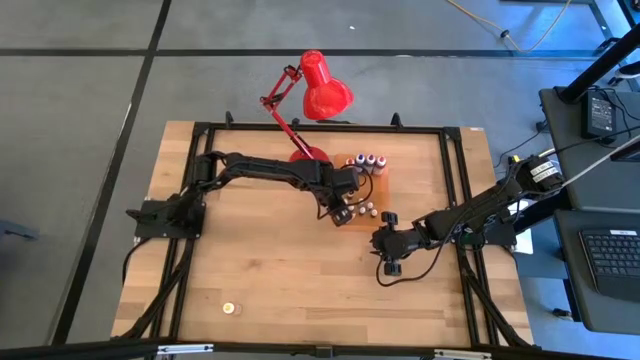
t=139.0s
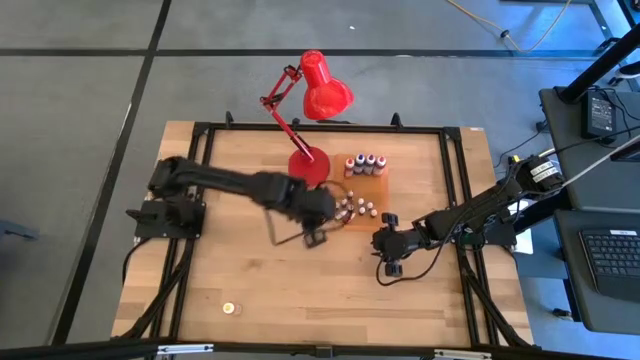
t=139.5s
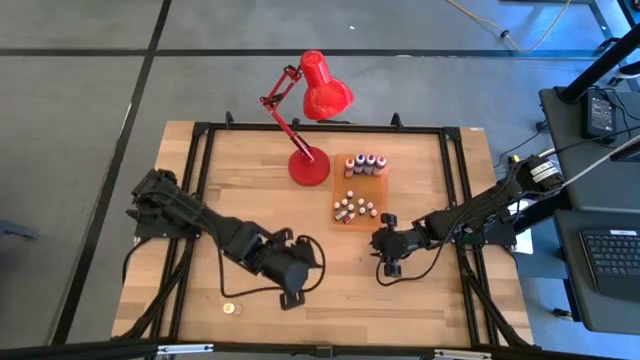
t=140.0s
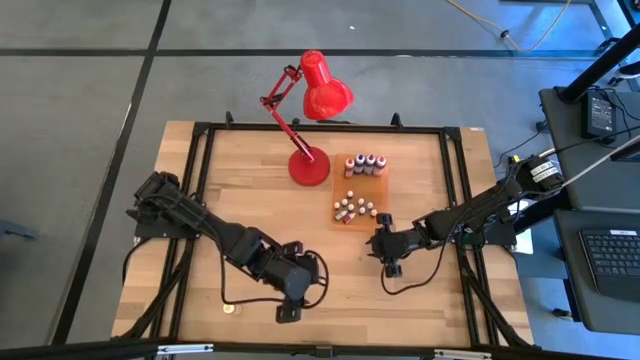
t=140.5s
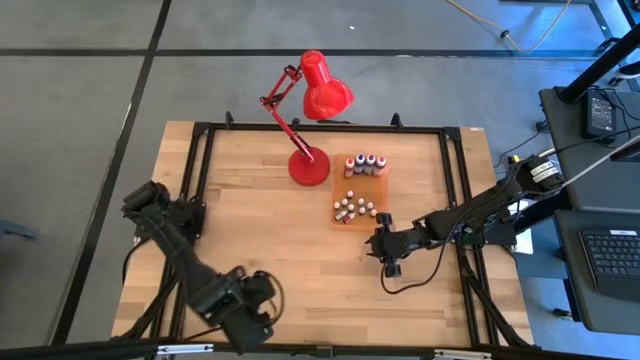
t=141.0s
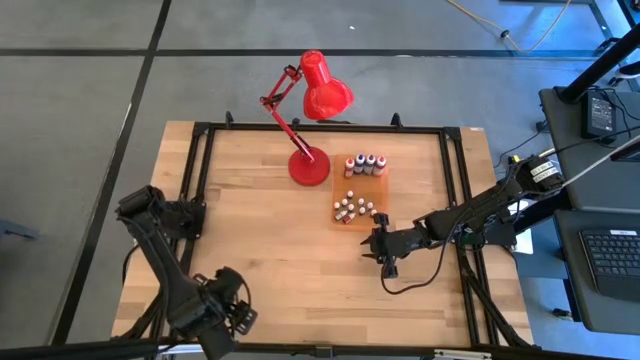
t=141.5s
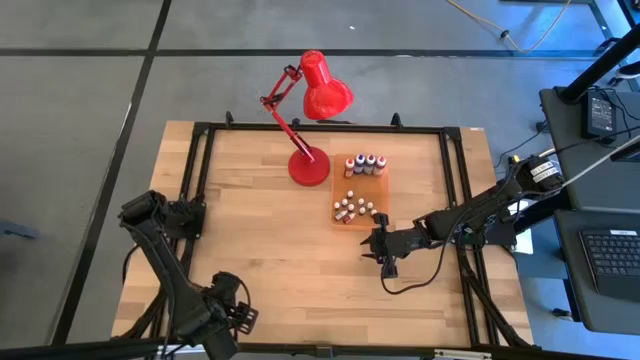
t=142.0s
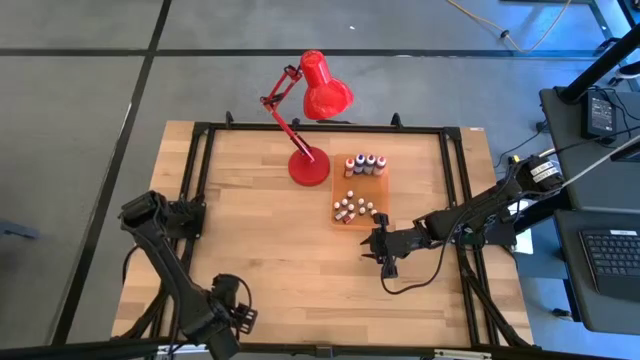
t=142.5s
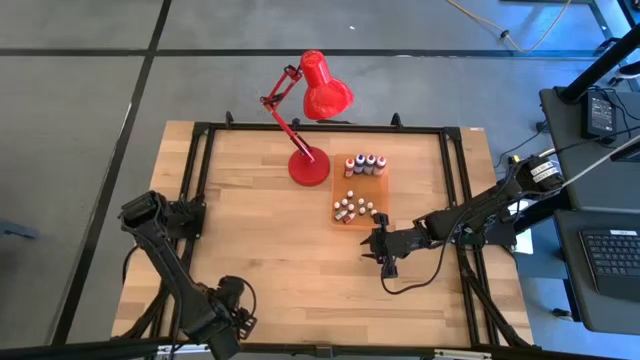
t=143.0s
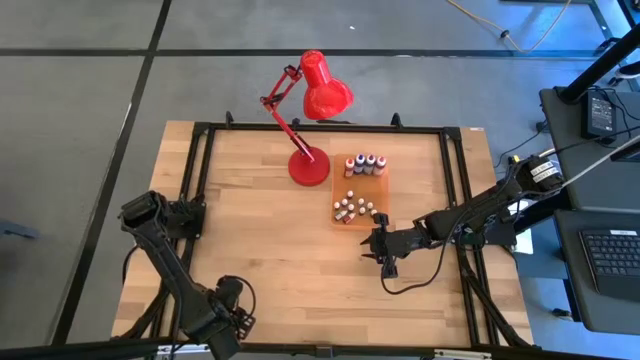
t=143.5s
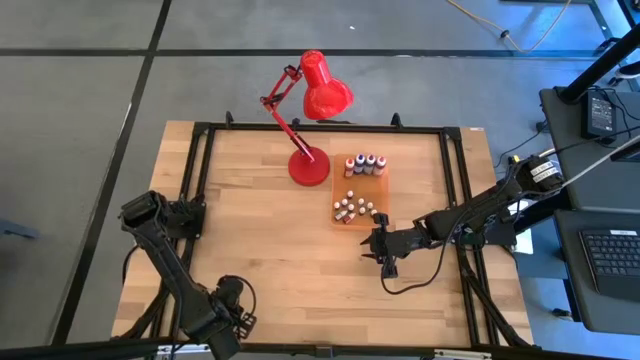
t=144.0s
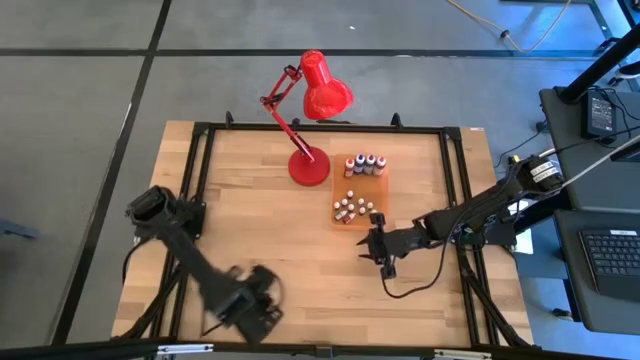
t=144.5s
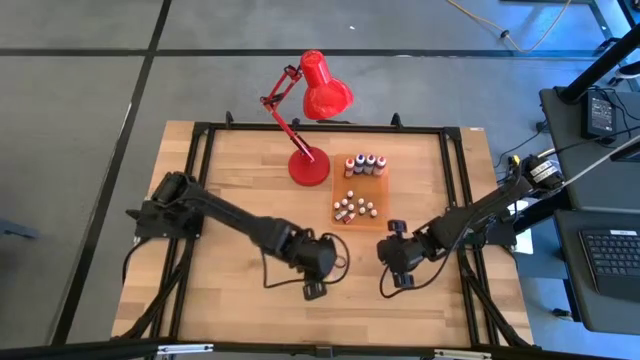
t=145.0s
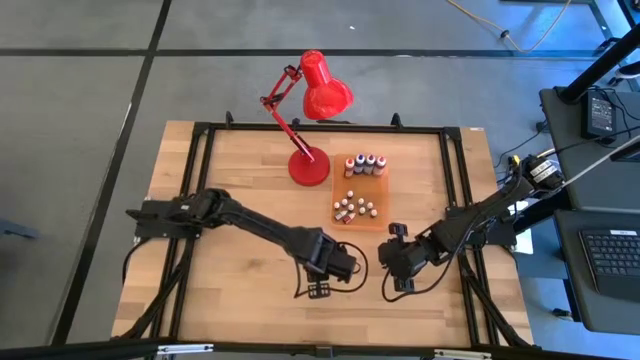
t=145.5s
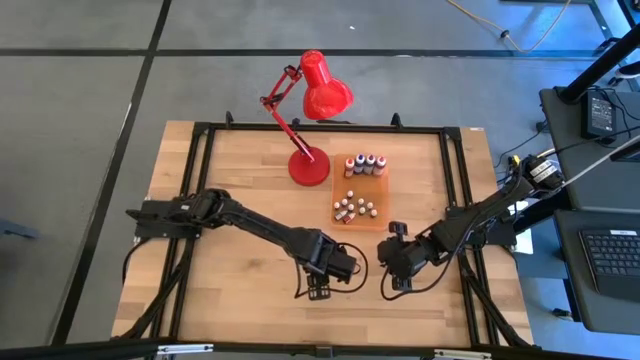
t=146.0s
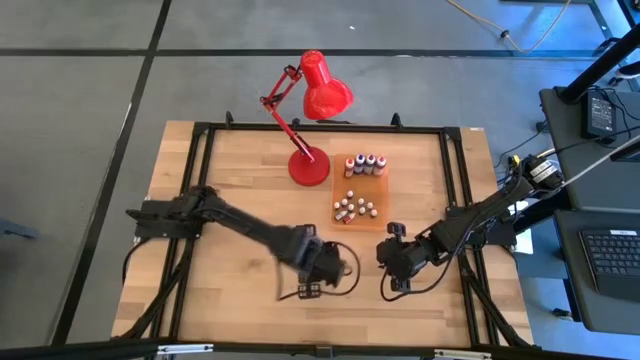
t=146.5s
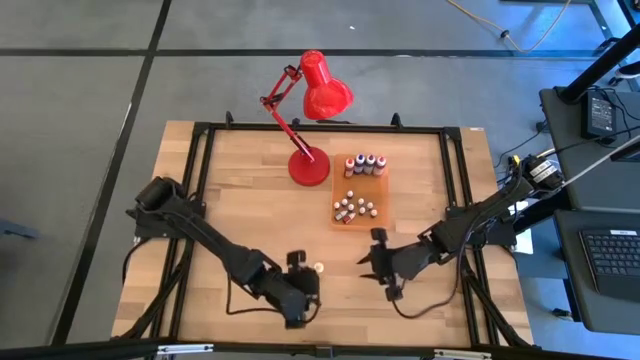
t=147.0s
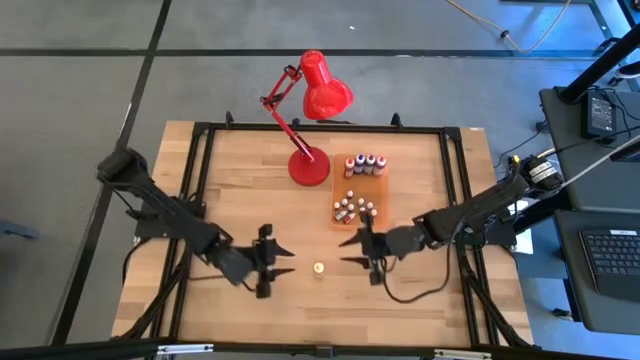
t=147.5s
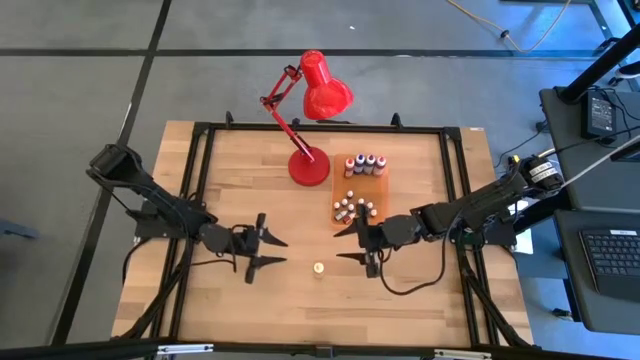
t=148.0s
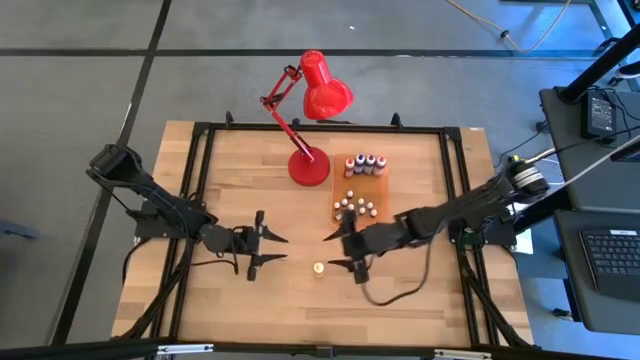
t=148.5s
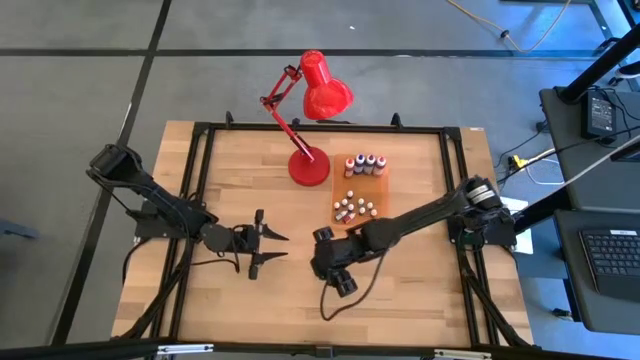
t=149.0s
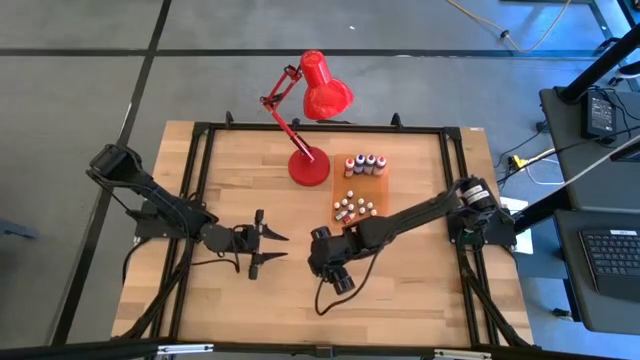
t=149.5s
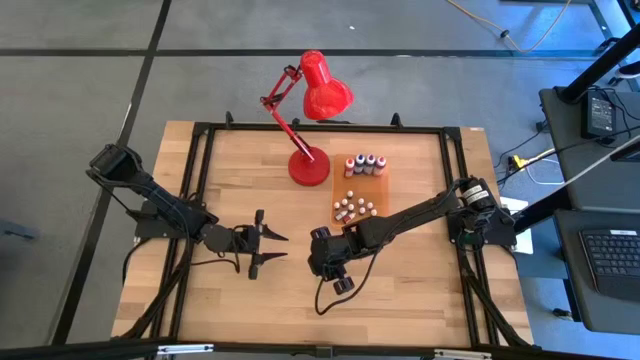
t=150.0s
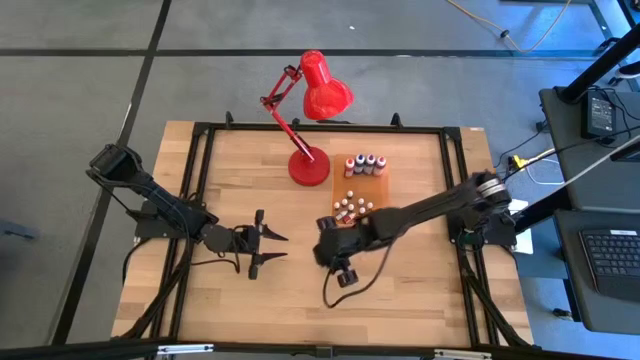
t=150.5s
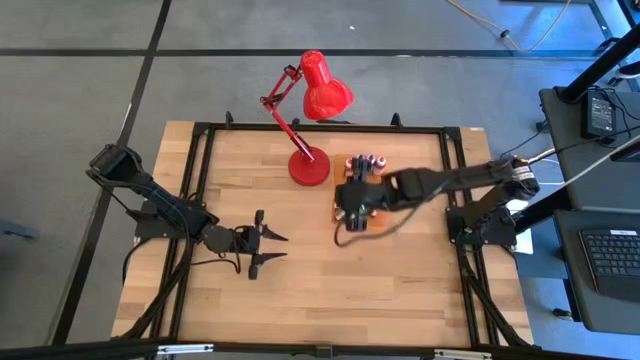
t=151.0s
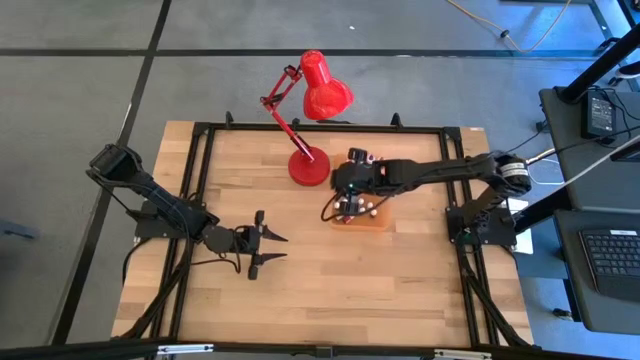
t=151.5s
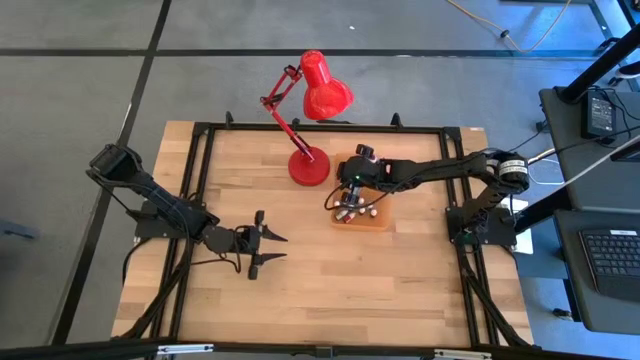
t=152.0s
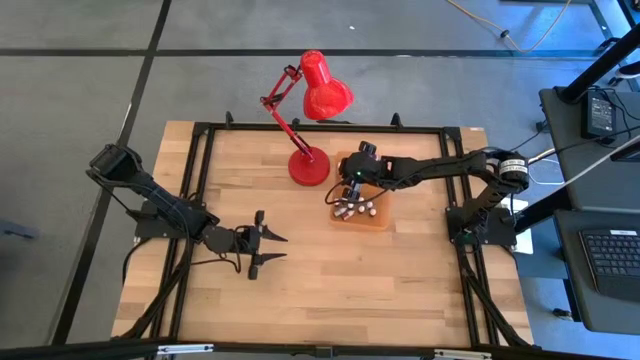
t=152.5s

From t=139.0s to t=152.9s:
Task: Pick & Place food coloring
Put the large yellow food coloring bottle into the orange bin

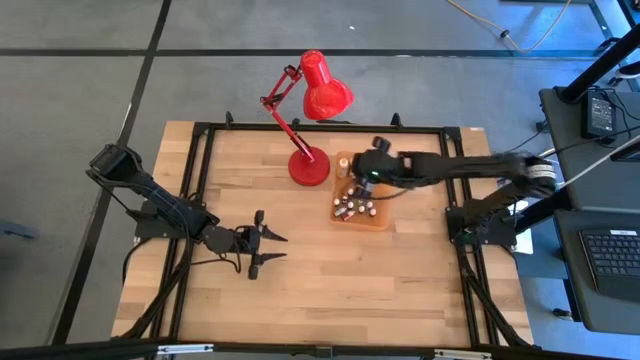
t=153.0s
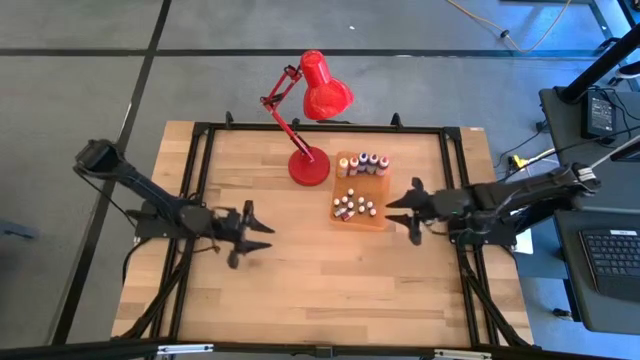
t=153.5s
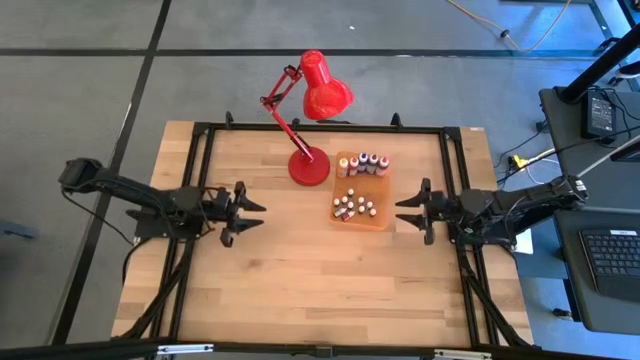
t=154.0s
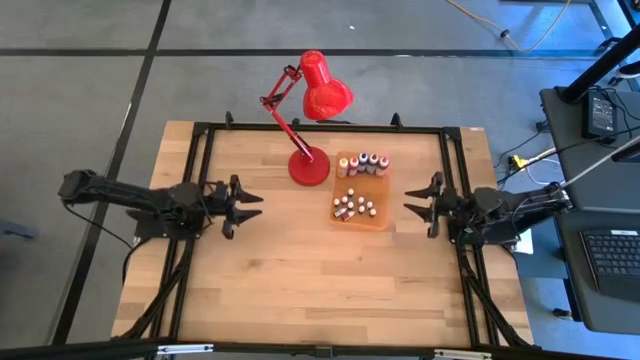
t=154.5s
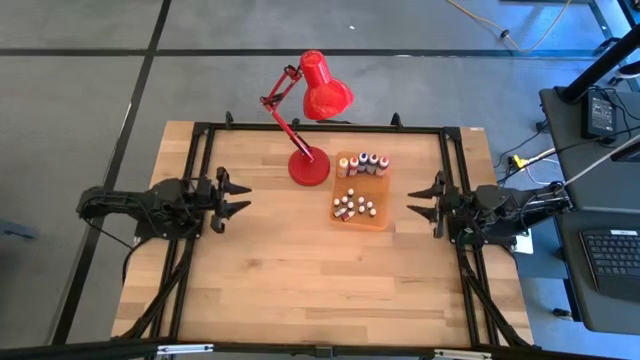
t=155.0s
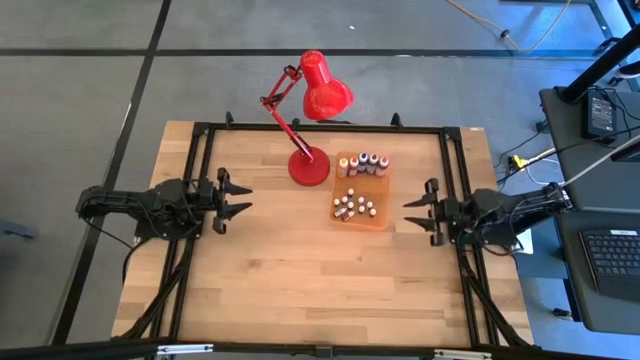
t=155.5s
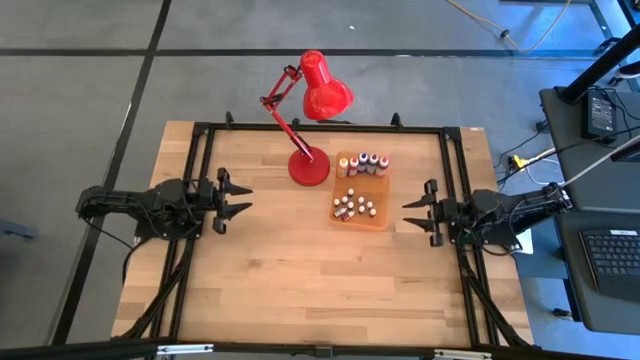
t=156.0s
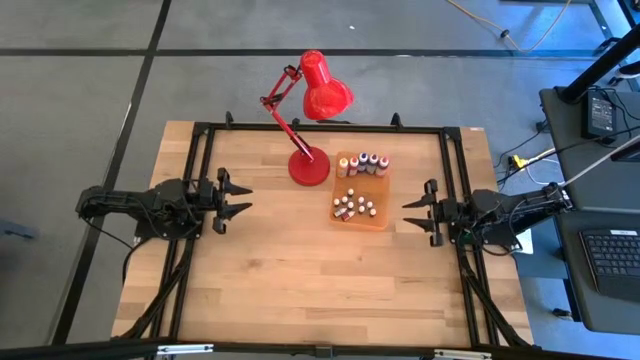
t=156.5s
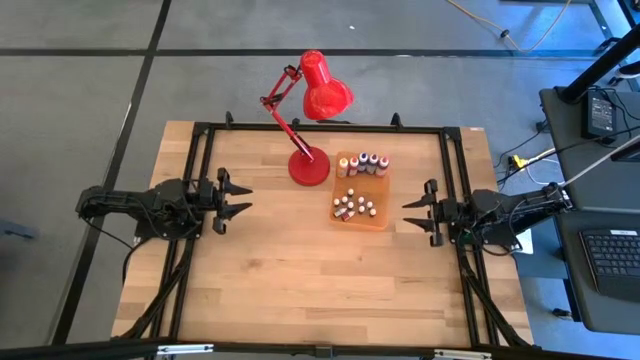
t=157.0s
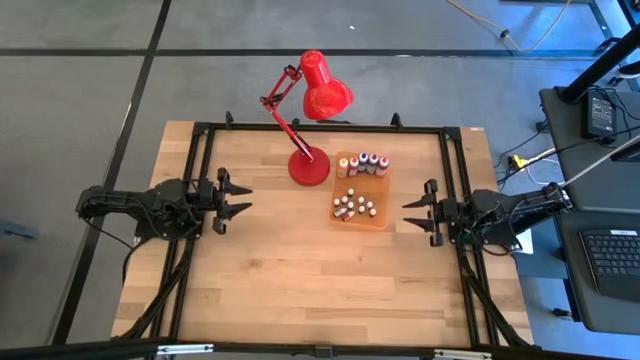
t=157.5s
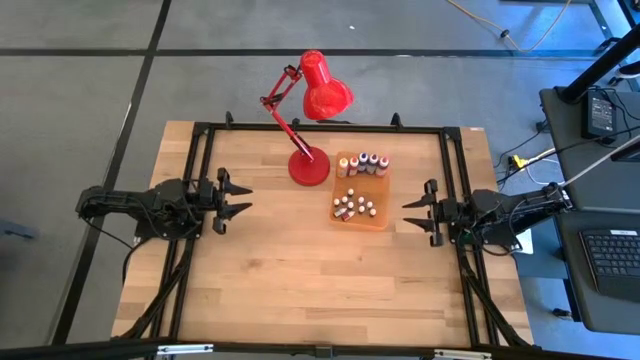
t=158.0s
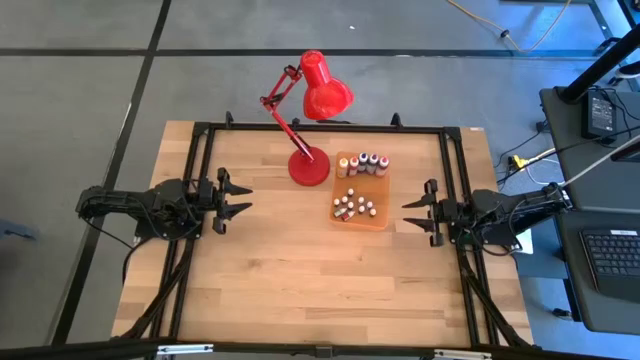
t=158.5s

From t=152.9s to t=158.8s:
Return to Home Position

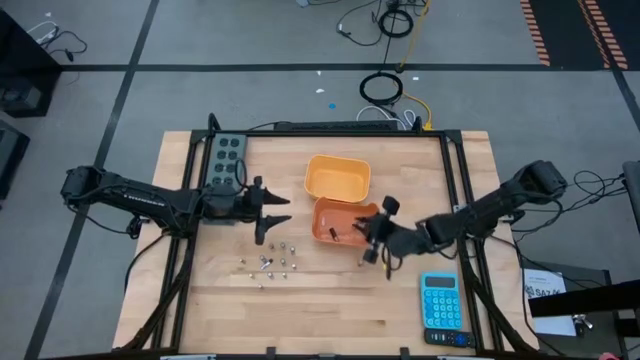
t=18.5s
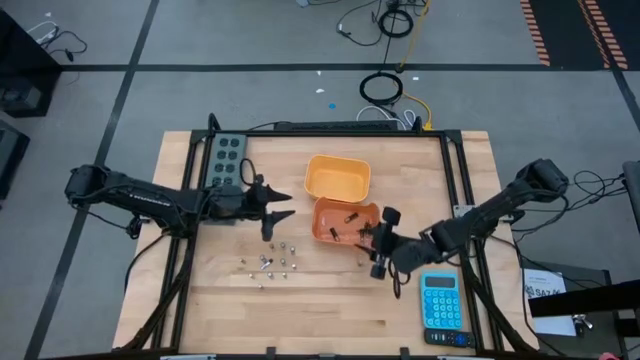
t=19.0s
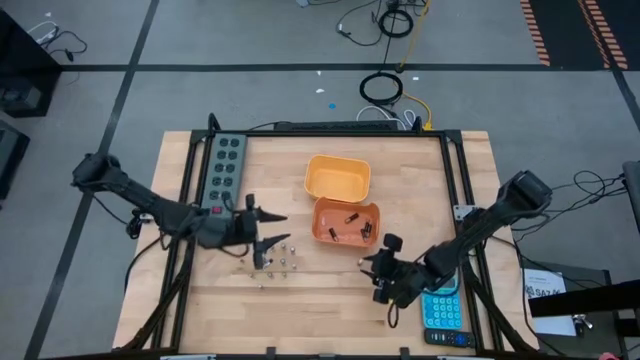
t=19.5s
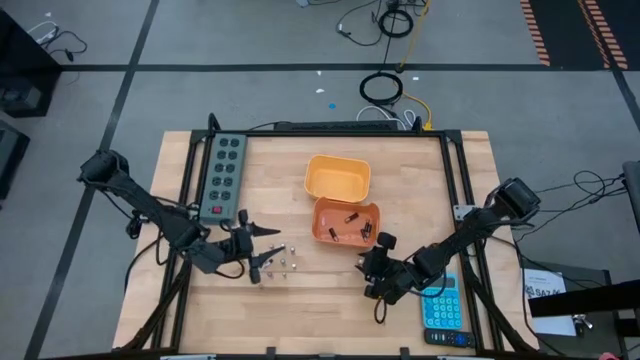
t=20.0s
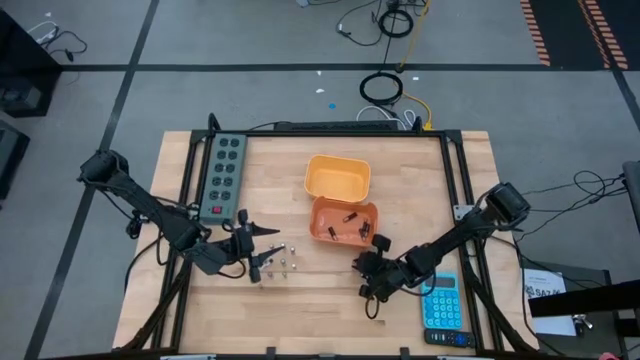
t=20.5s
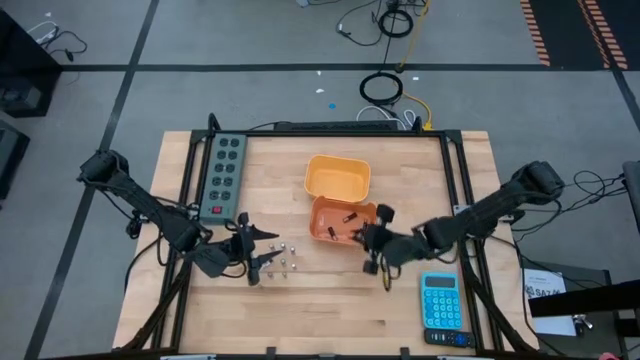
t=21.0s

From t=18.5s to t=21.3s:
Task: Sort batteries
Put the black battery into the orange bin
